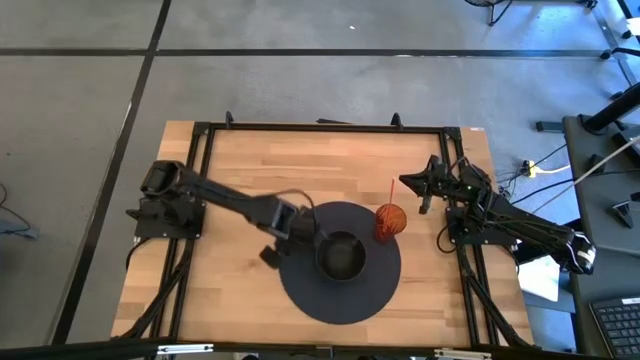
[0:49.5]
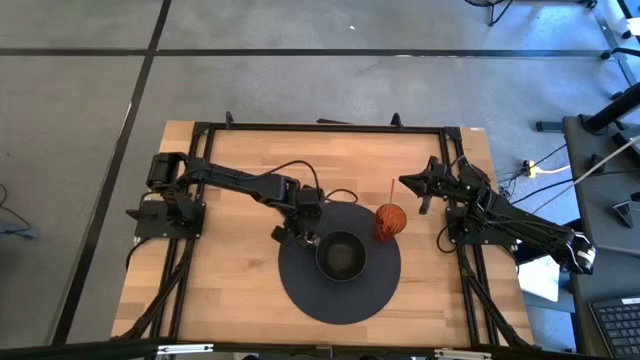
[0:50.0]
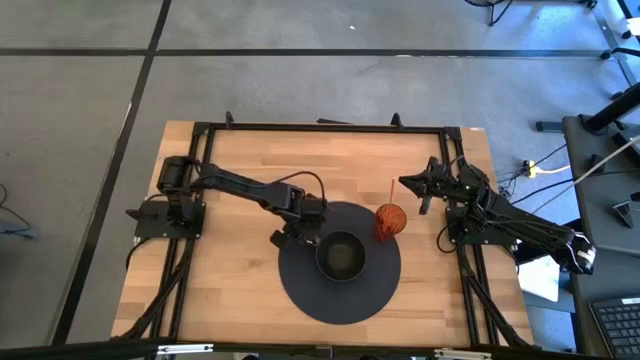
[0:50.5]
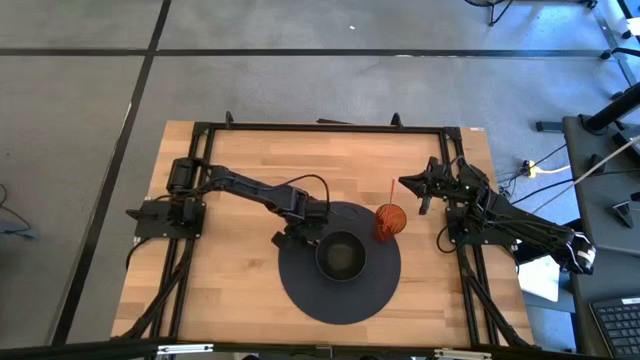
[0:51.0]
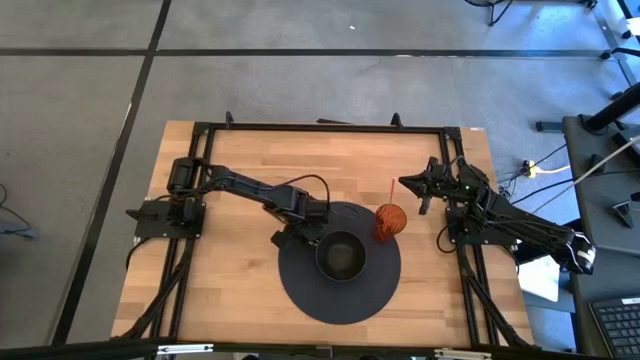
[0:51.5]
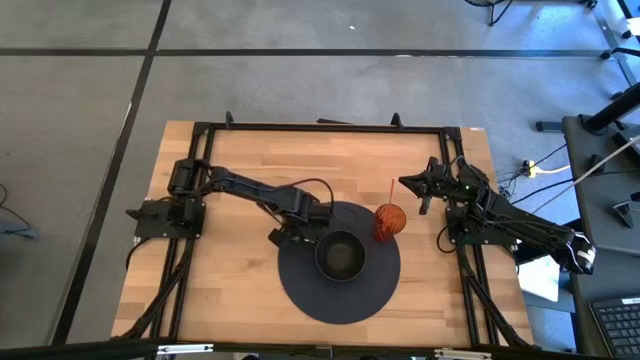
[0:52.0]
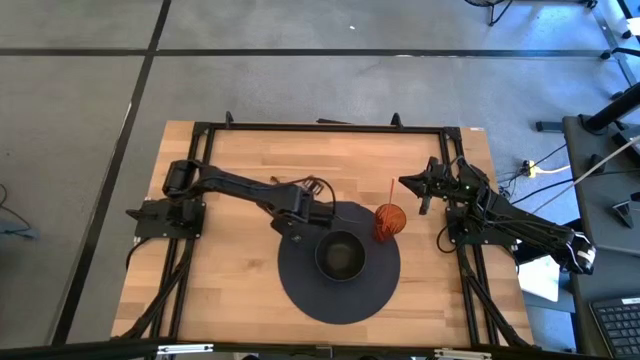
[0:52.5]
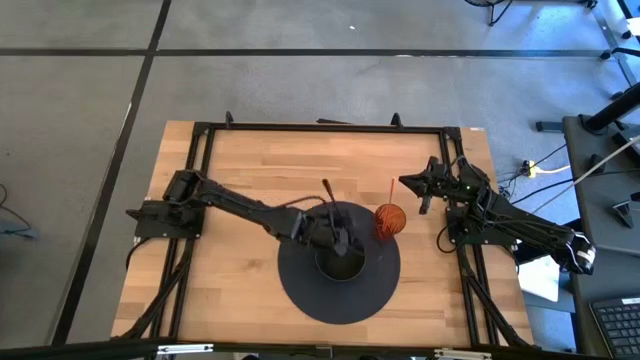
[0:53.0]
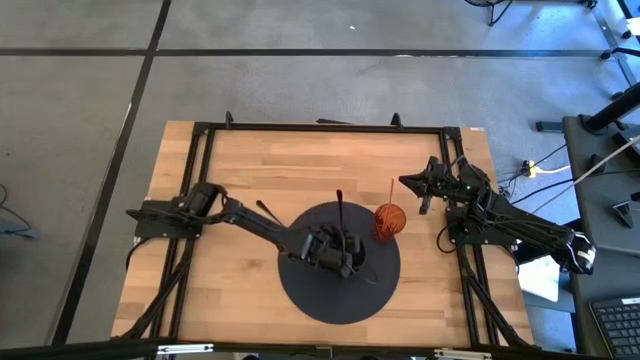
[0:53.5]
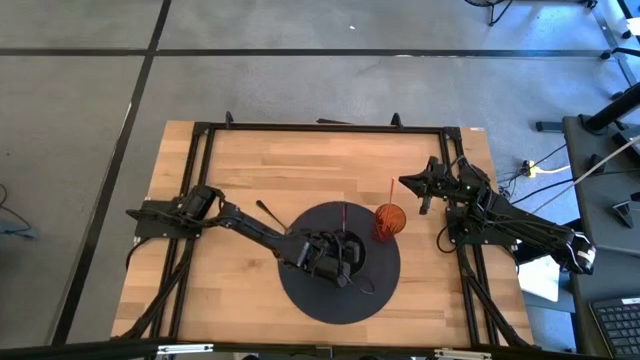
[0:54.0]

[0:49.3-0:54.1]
Task: Pick & Place Utensil
Put the black spoon into the black bowl

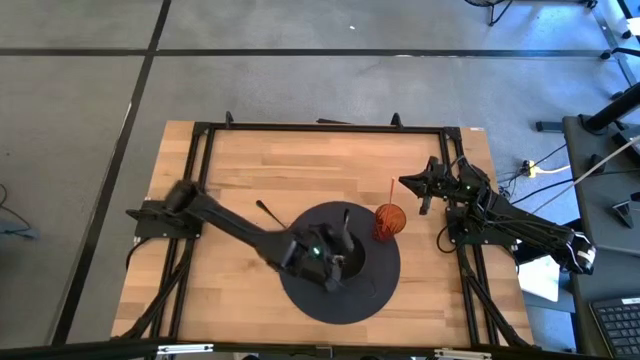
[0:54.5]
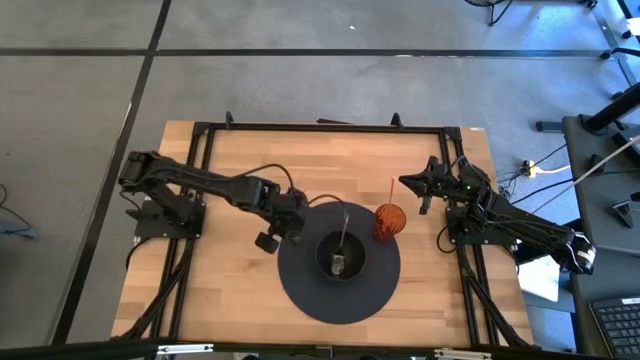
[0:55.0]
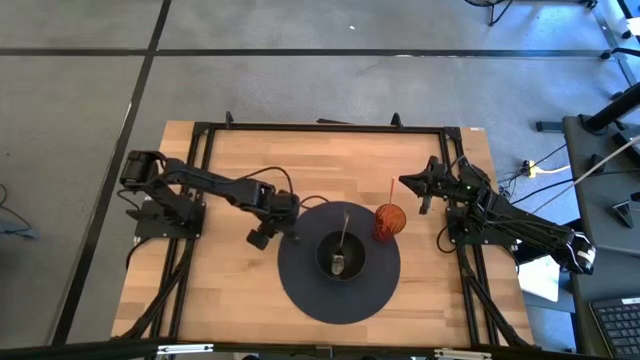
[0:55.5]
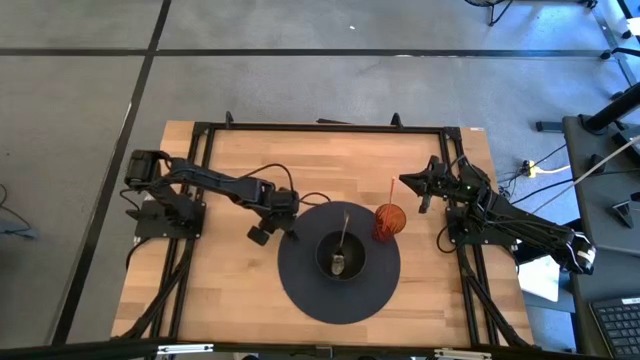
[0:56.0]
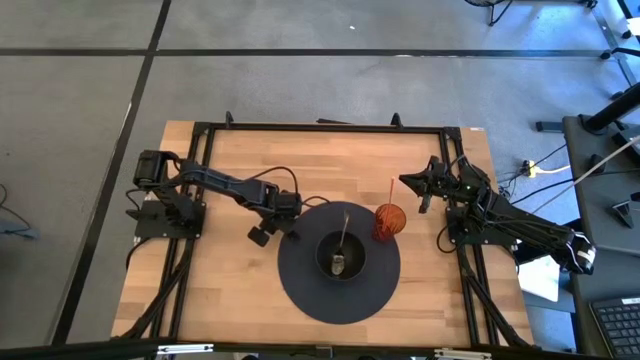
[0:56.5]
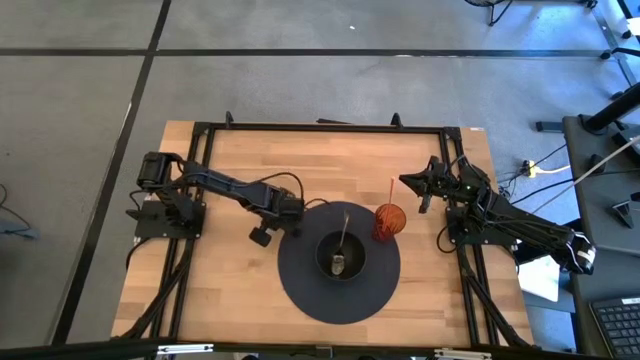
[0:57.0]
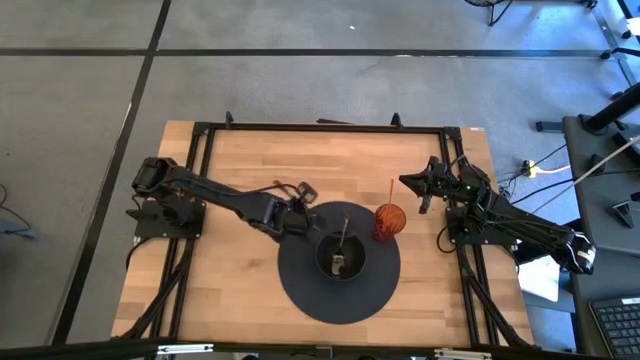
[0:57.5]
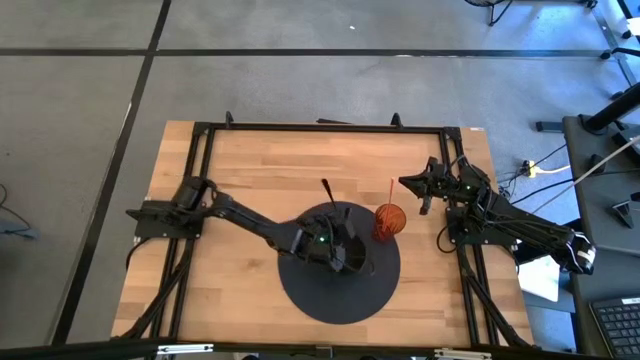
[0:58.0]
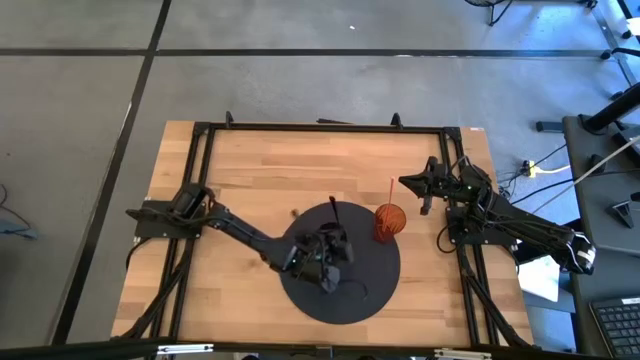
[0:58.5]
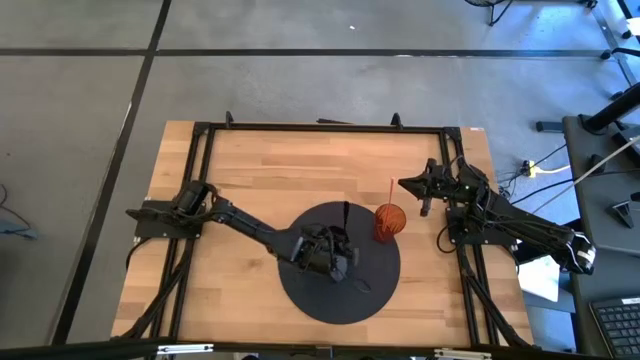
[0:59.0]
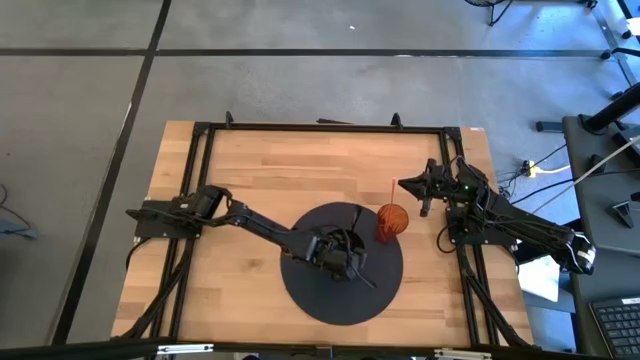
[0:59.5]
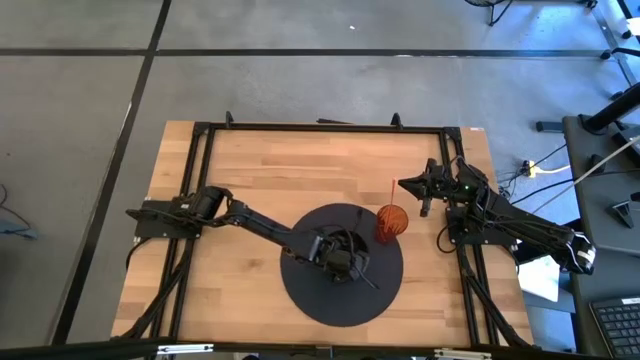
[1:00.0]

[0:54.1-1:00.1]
Put the black fork into the black bowl

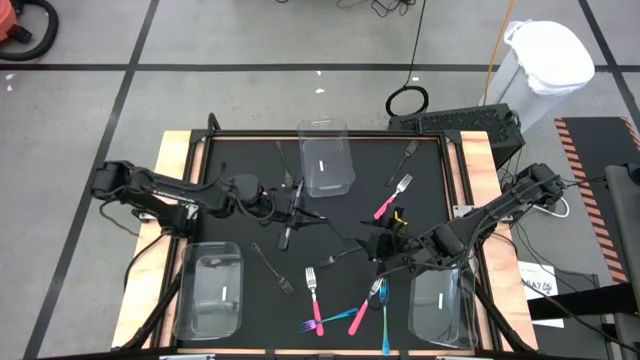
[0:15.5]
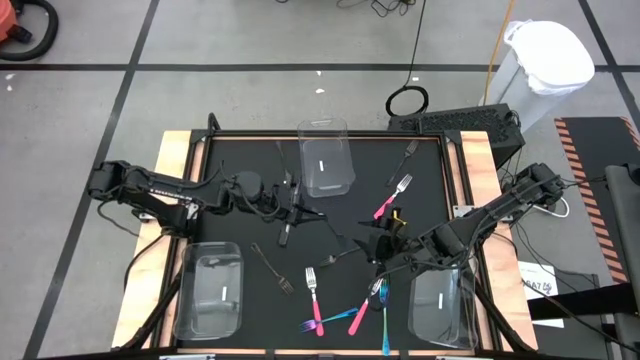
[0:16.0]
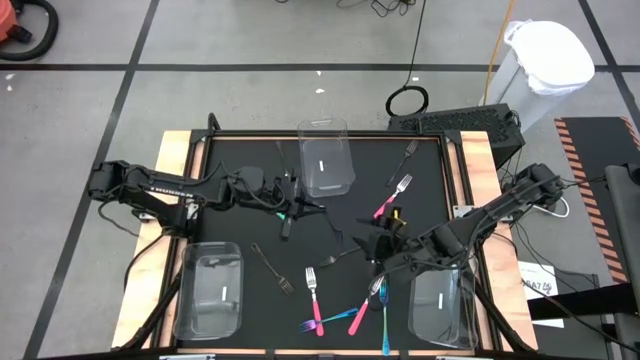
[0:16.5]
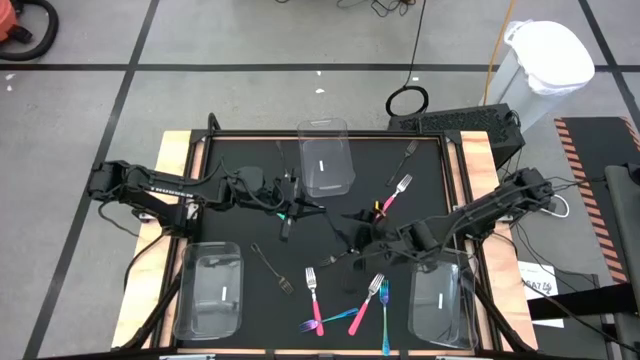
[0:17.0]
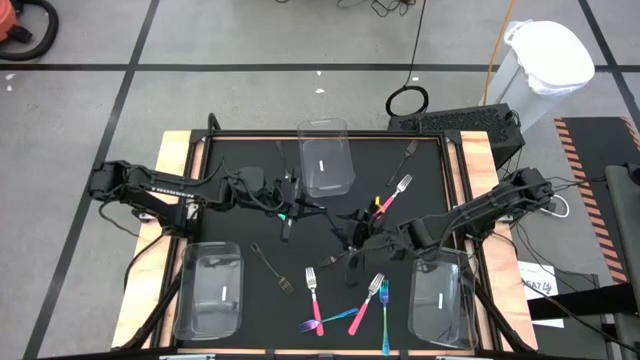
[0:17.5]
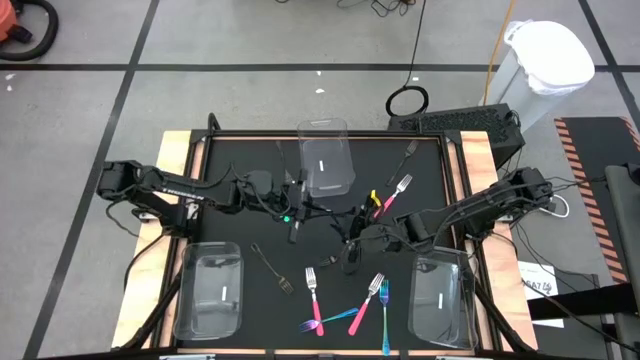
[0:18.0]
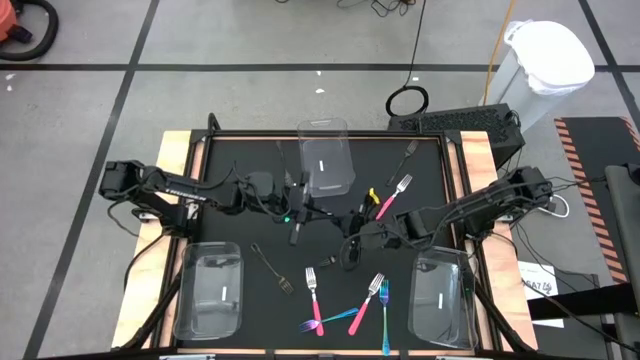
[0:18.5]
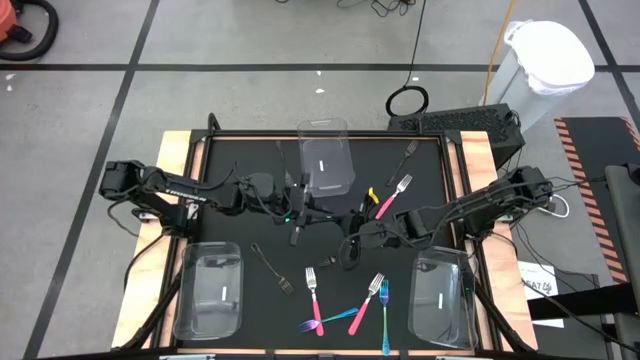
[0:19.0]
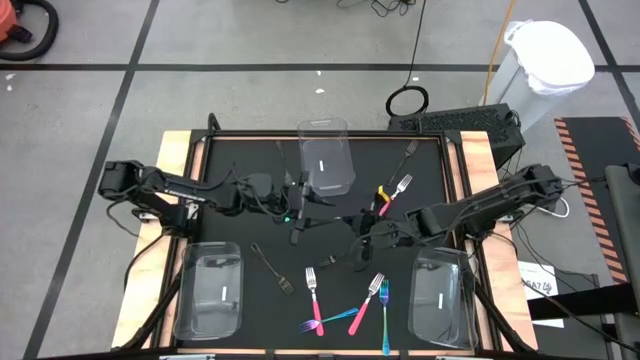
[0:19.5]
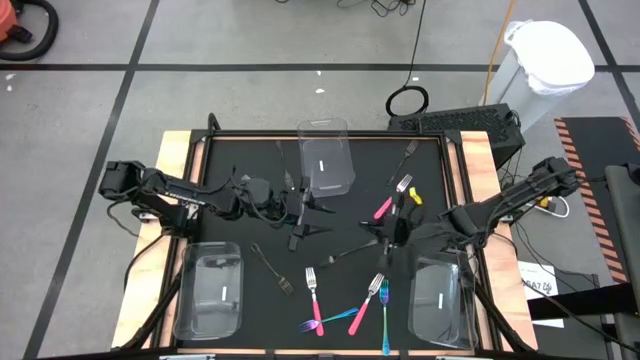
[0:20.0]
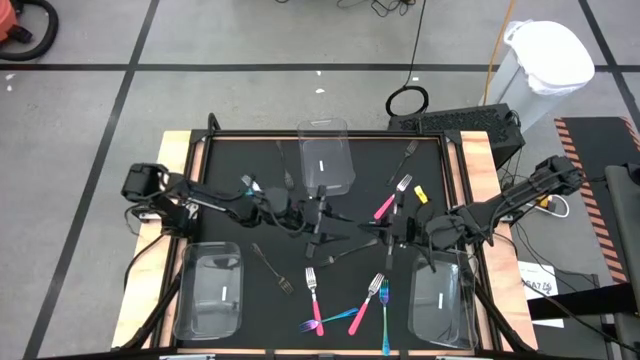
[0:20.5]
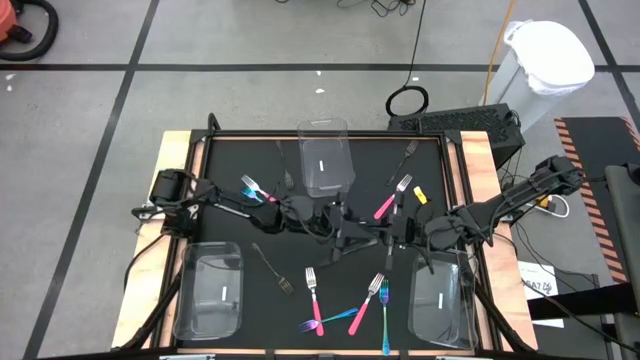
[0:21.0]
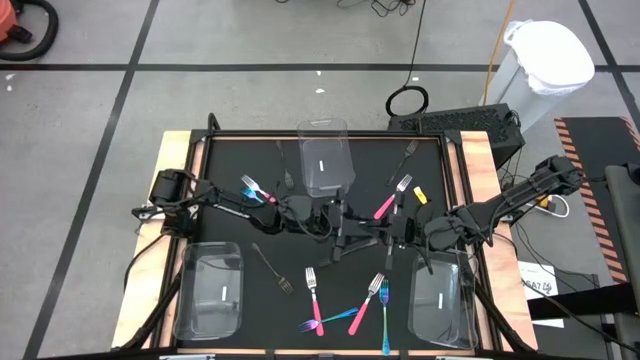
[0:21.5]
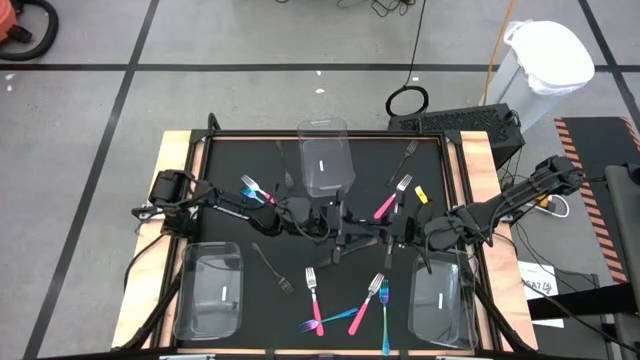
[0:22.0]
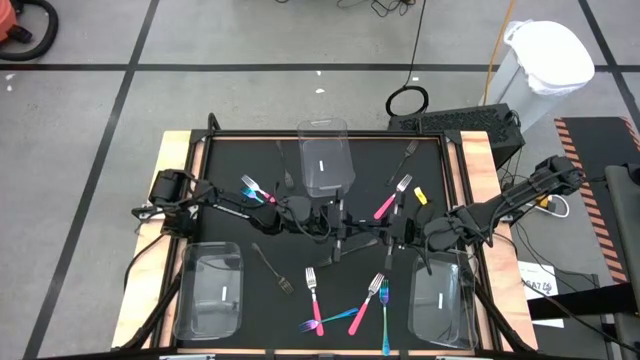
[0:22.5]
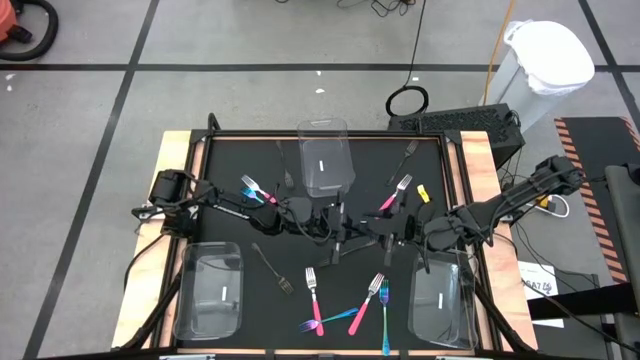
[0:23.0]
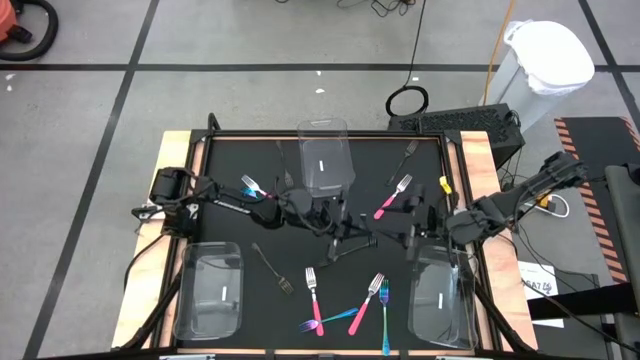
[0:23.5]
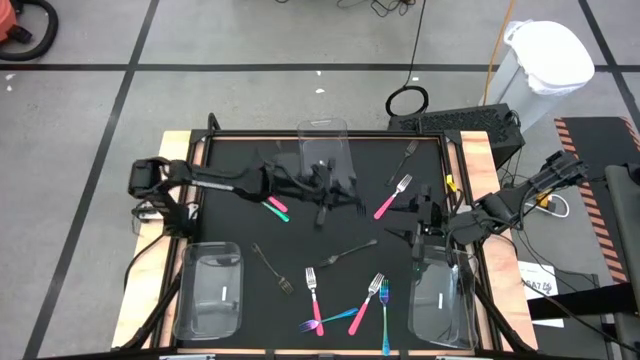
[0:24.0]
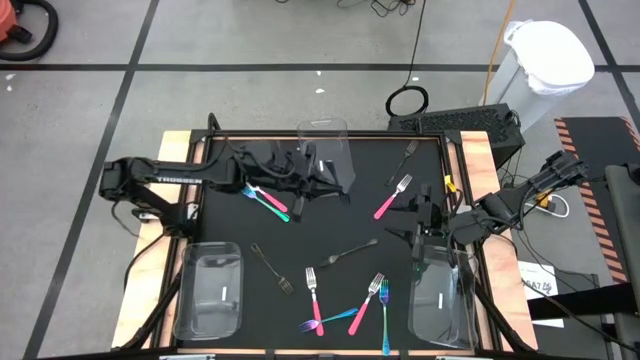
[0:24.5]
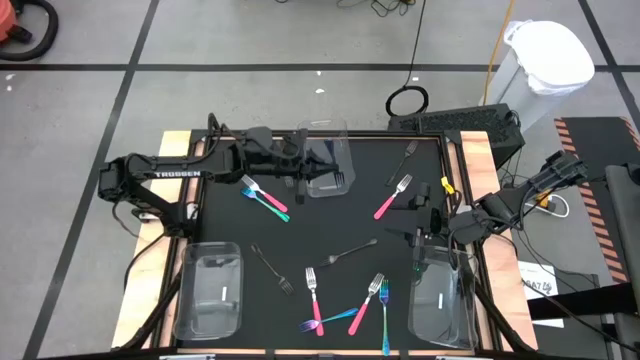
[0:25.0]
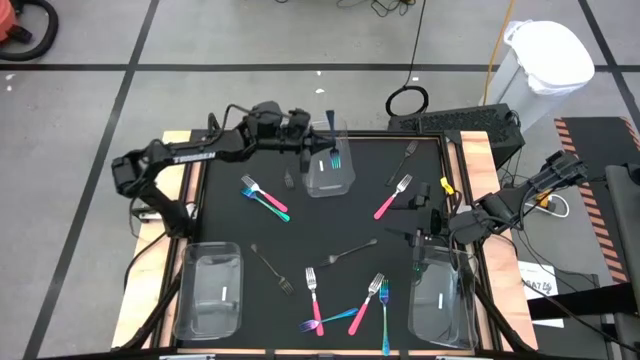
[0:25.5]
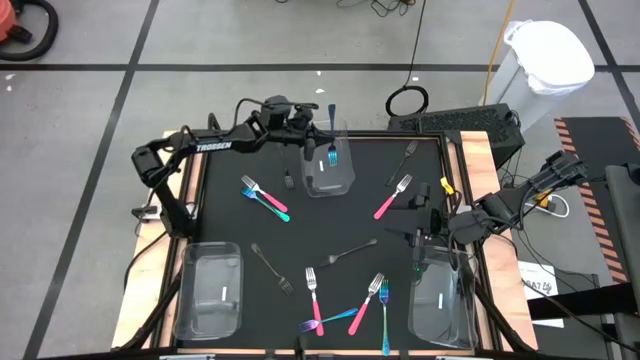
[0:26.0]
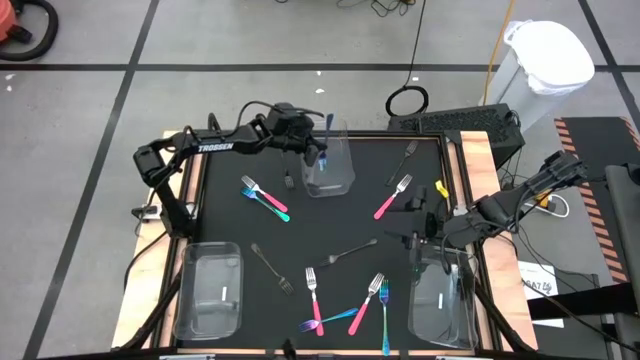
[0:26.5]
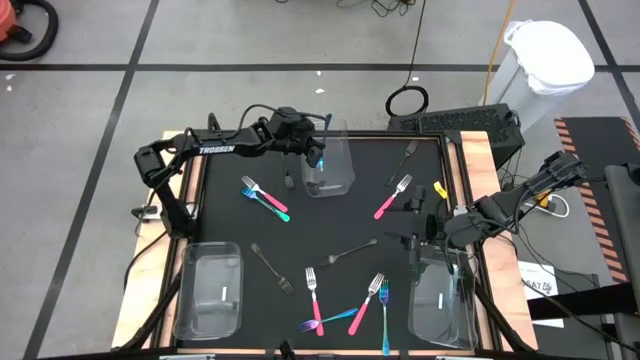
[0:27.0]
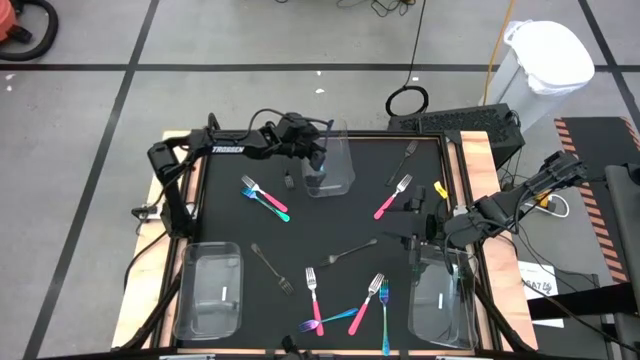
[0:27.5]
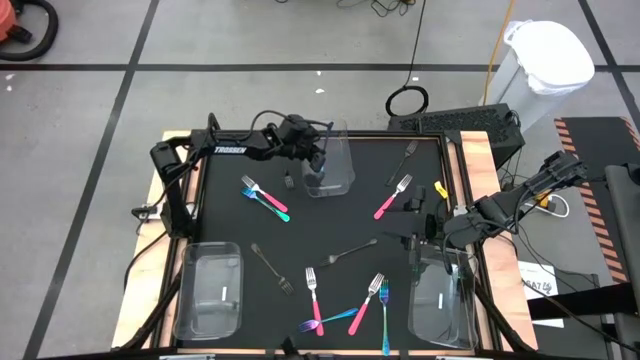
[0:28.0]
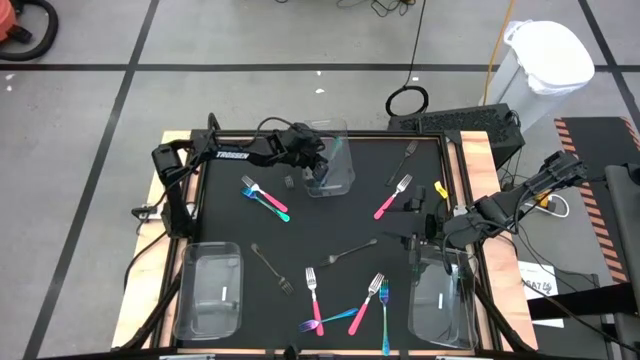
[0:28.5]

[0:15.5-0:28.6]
Task: Sort silverware by color (type)
Put the blue fork into the top transparent bin
